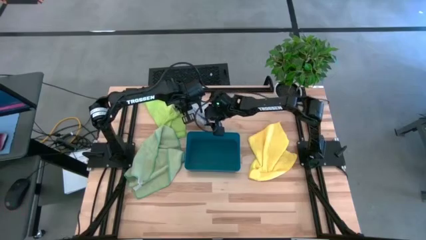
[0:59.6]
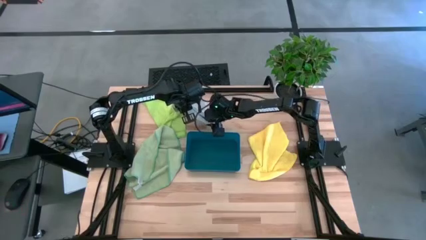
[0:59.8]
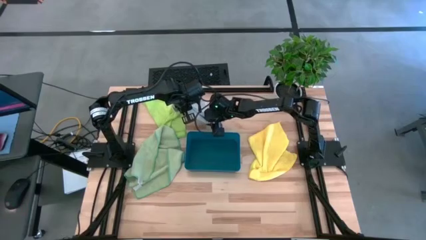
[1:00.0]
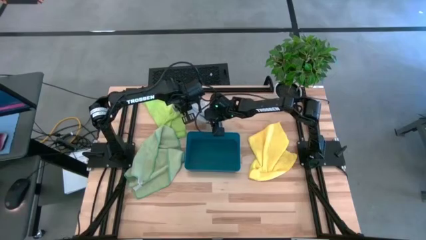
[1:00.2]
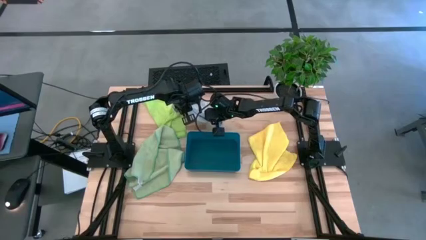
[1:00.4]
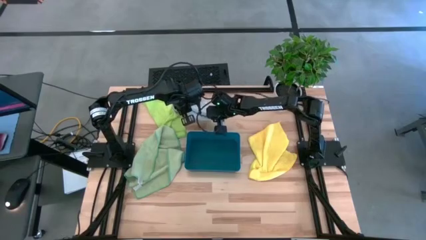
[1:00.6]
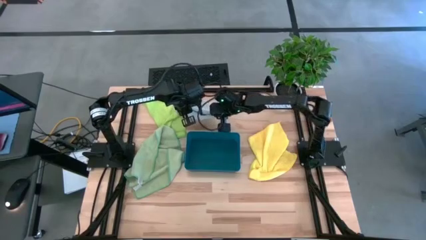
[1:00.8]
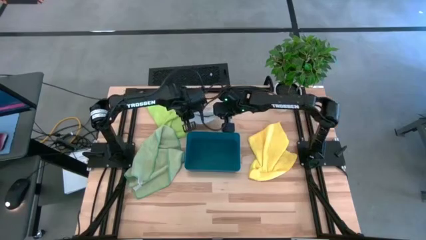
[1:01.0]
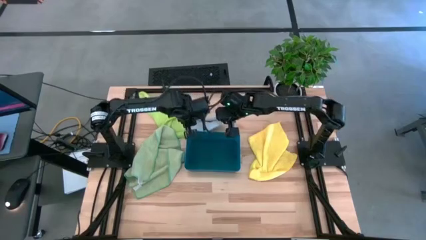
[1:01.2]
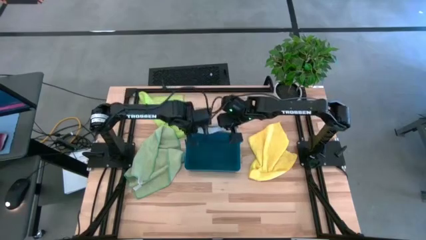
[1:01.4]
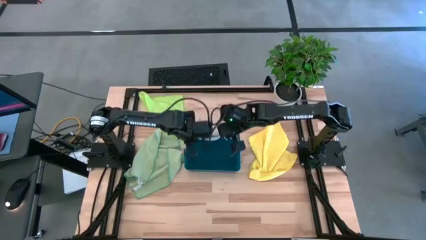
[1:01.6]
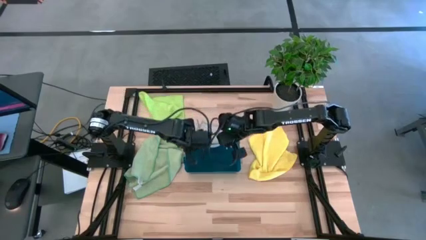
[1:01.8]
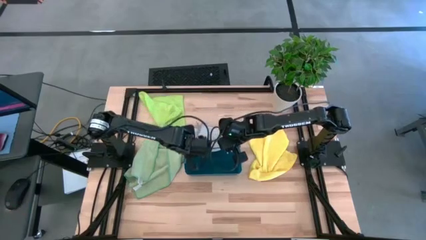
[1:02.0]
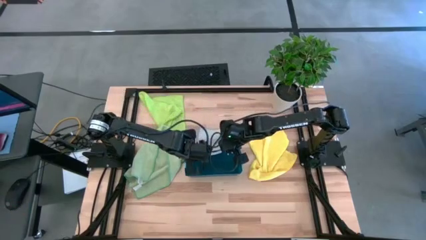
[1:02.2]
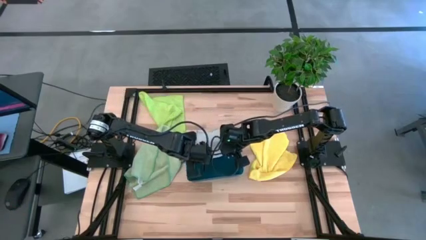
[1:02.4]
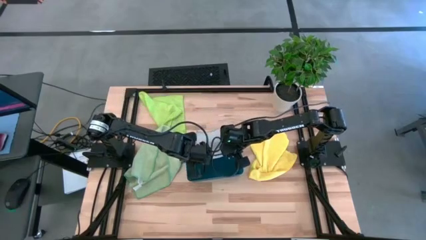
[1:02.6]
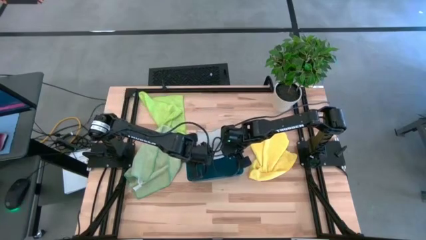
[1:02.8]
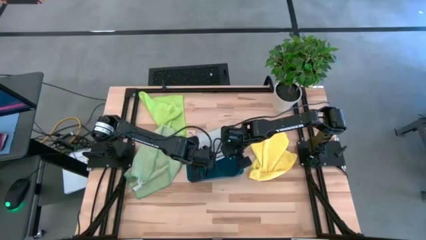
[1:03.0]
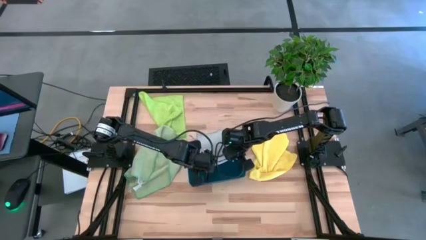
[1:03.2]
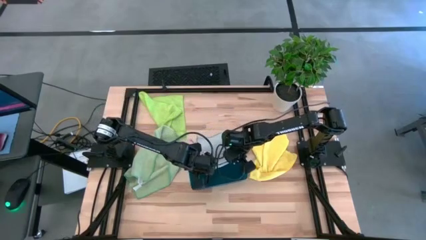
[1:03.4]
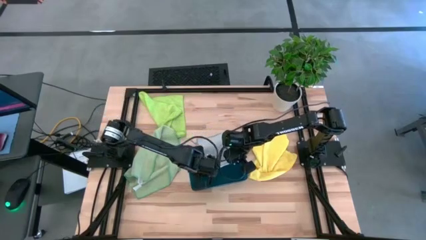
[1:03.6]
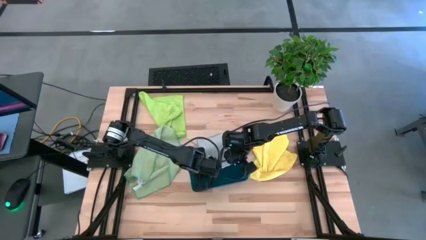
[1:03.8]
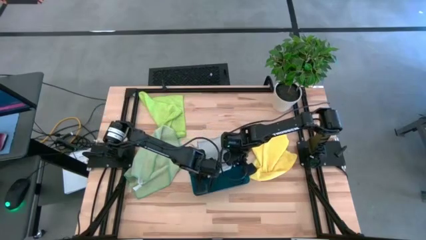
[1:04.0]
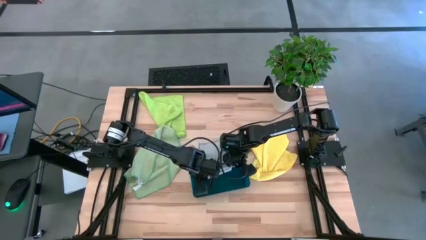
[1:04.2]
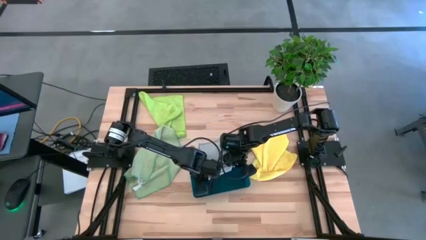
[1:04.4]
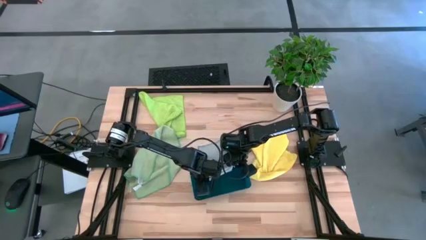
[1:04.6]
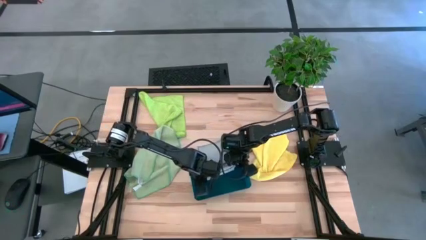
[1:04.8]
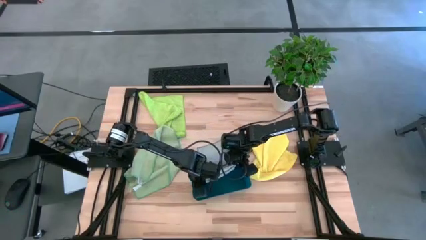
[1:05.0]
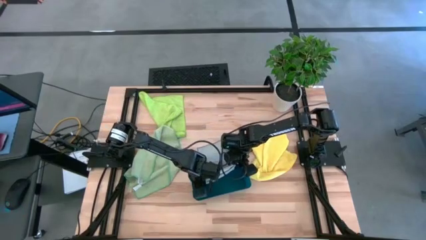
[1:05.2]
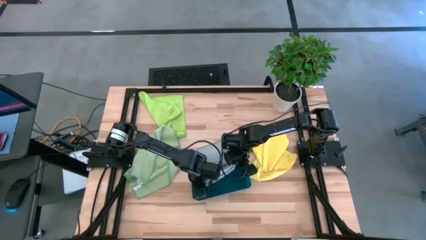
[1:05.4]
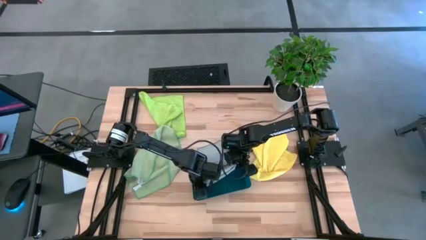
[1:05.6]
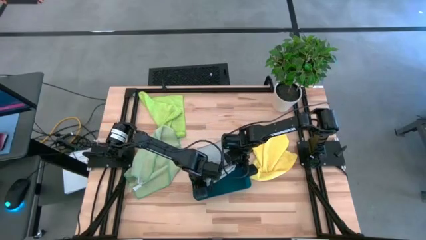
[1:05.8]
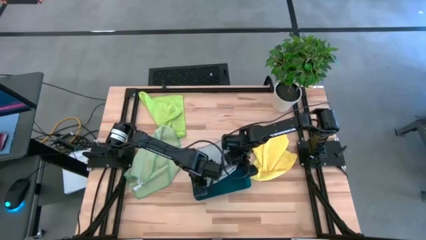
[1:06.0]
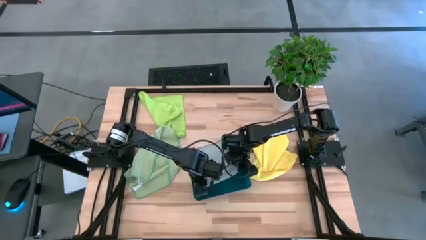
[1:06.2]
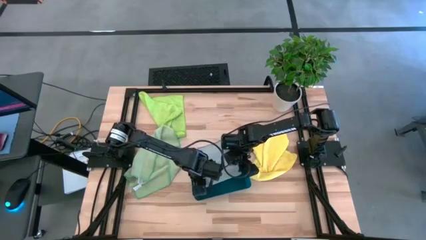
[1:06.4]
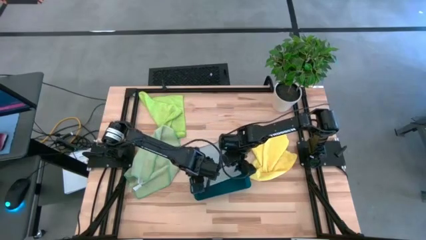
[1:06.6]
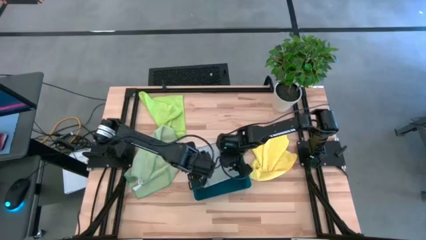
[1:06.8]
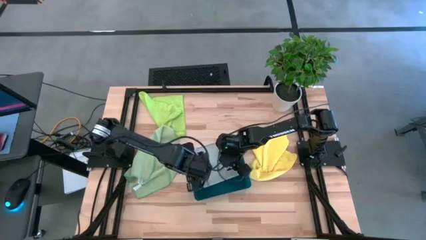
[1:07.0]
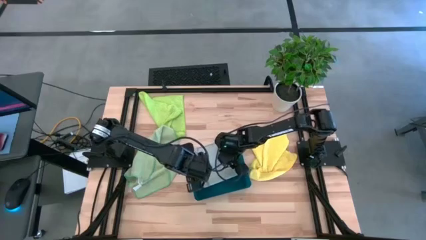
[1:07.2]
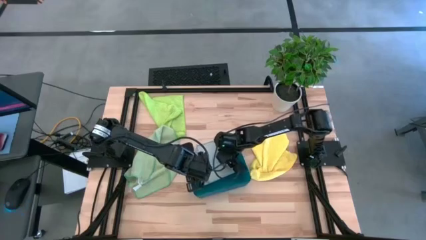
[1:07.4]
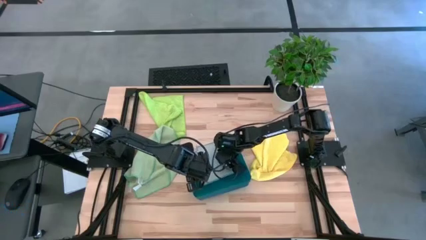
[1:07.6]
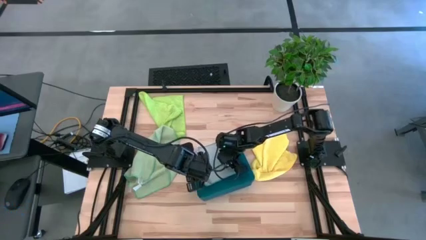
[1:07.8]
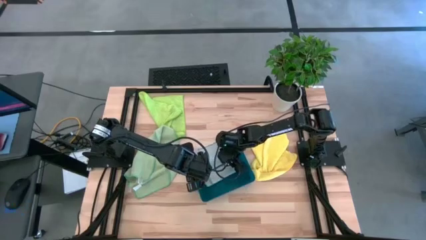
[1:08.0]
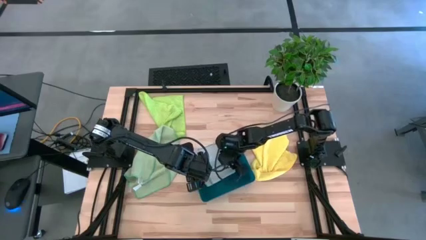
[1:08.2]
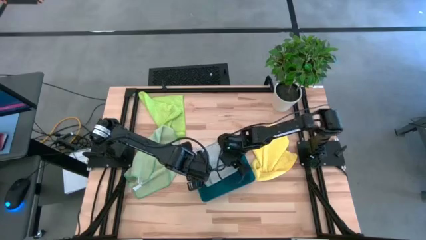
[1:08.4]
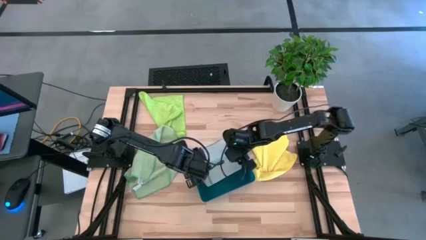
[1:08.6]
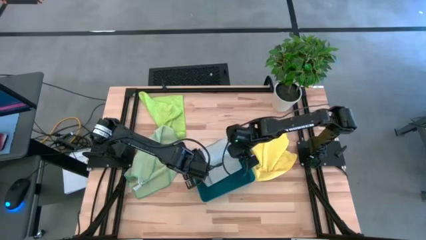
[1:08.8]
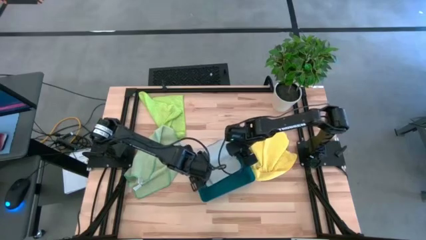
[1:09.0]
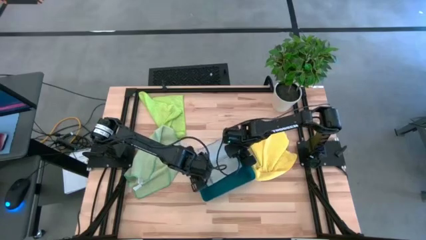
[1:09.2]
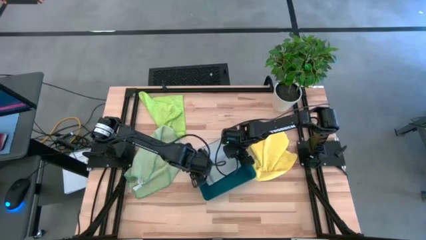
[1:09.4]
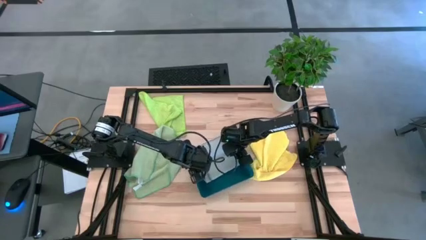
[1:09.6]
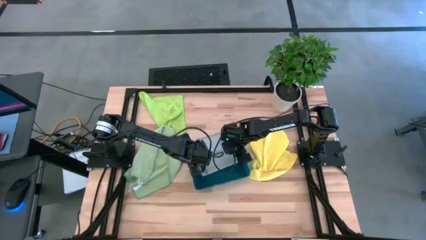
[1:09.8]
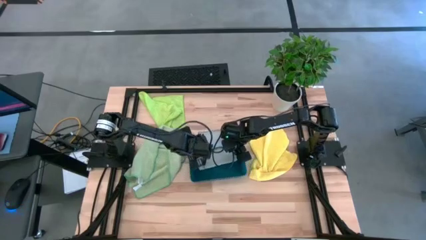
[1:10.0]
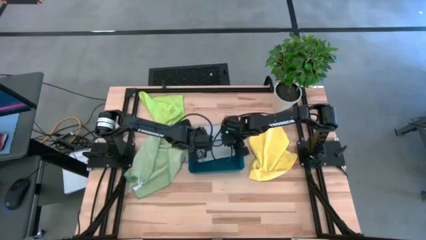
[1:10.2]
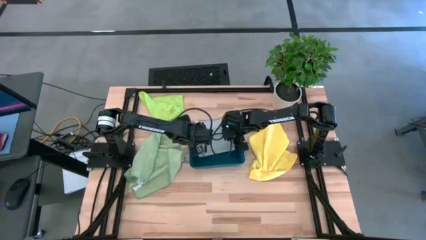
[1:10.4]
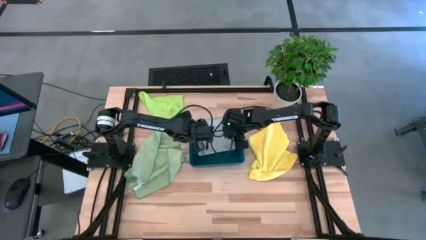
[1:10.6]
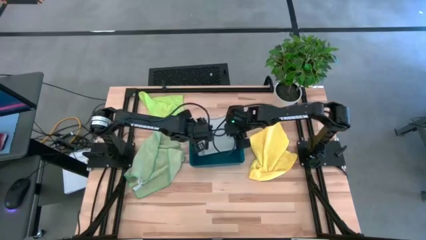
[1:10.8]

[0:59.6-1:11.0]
Task: Fold microfiber towels
Put the folded gray microfiber towel into the blue bin

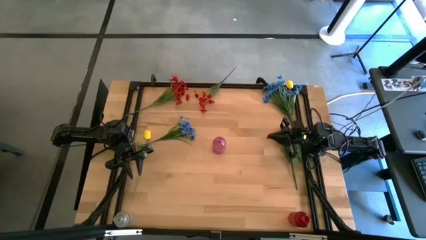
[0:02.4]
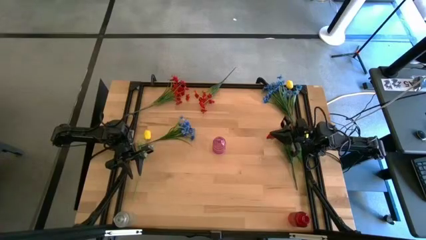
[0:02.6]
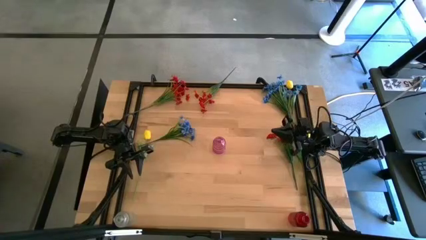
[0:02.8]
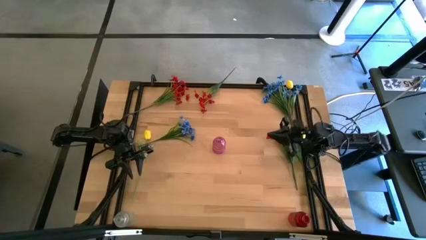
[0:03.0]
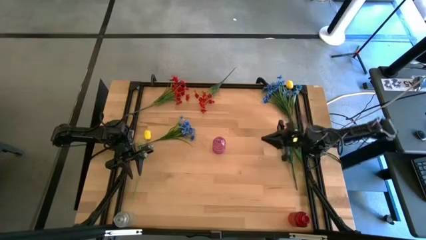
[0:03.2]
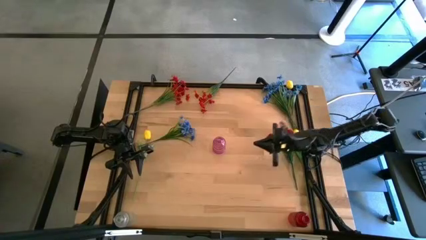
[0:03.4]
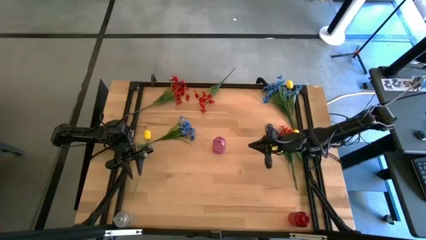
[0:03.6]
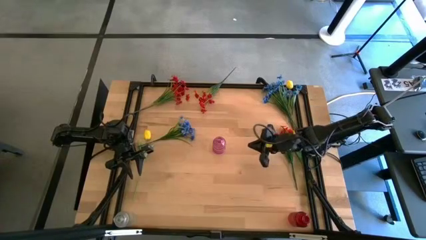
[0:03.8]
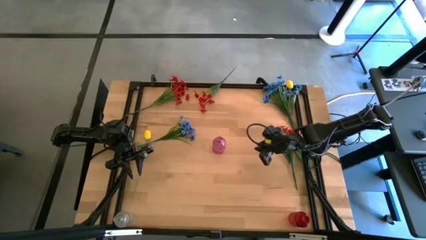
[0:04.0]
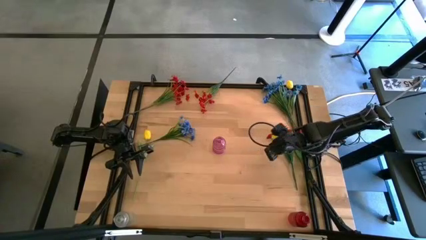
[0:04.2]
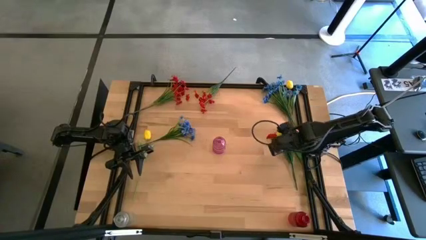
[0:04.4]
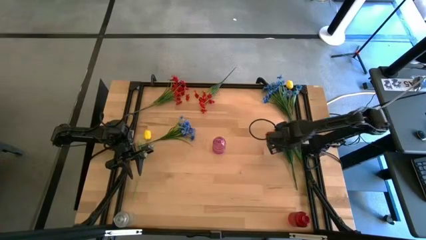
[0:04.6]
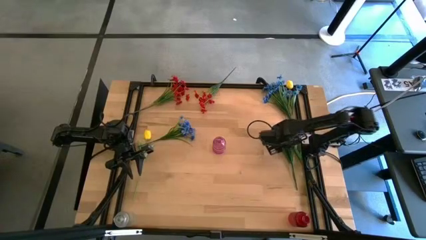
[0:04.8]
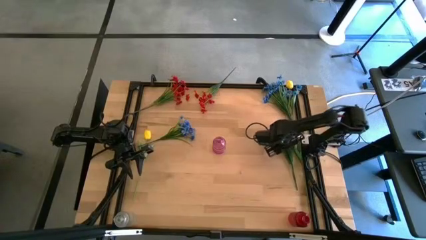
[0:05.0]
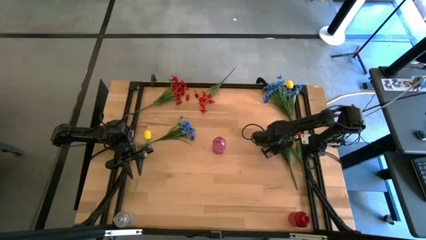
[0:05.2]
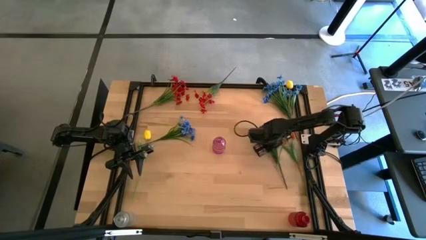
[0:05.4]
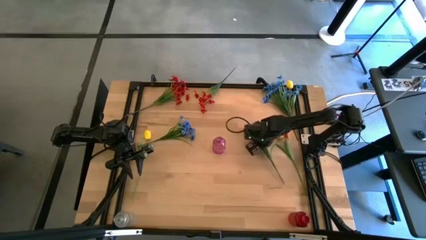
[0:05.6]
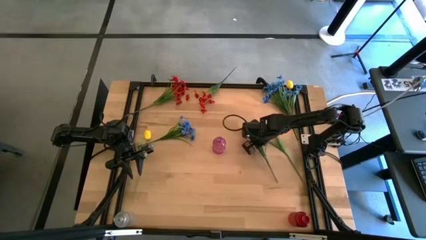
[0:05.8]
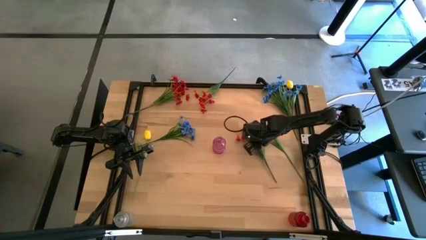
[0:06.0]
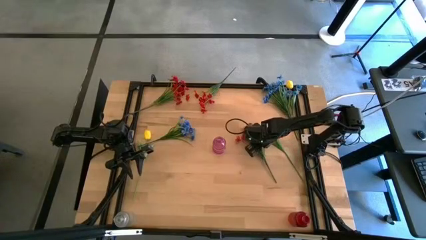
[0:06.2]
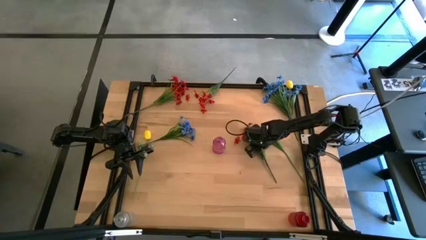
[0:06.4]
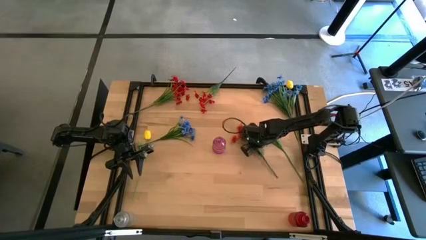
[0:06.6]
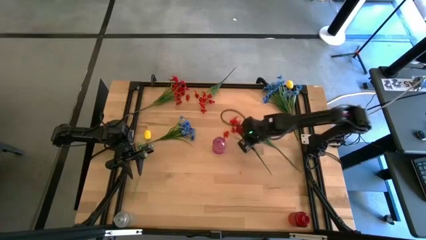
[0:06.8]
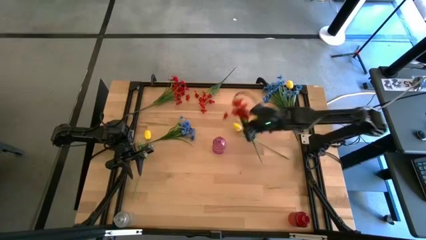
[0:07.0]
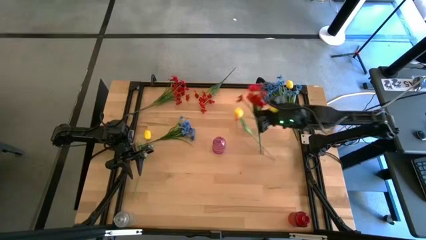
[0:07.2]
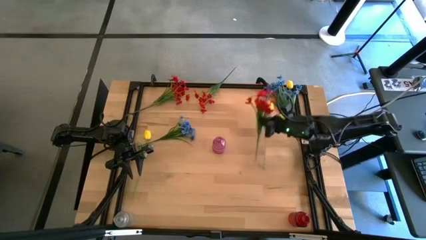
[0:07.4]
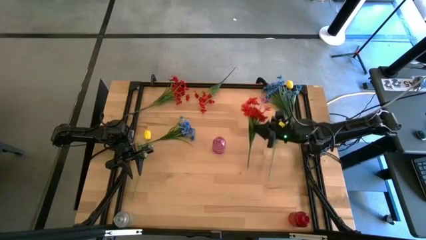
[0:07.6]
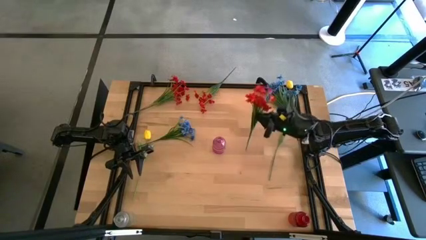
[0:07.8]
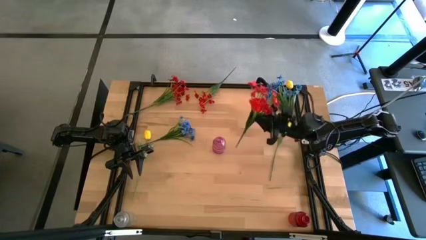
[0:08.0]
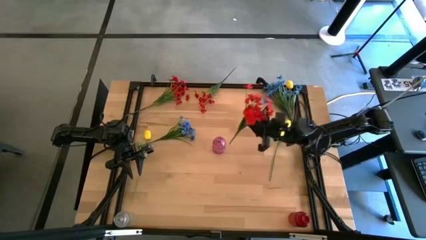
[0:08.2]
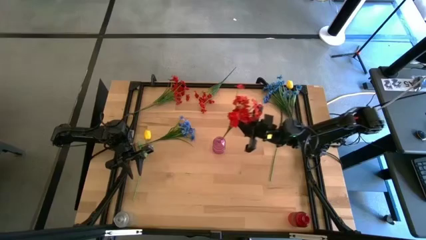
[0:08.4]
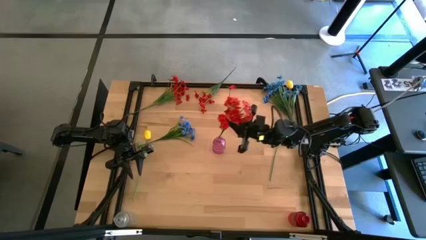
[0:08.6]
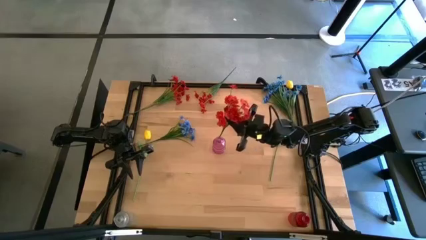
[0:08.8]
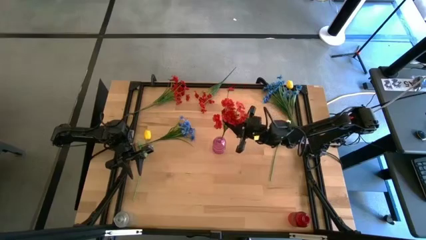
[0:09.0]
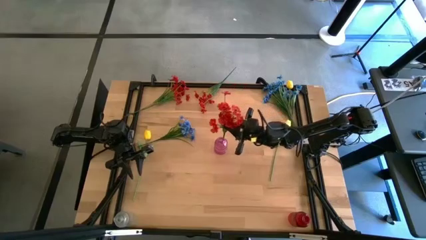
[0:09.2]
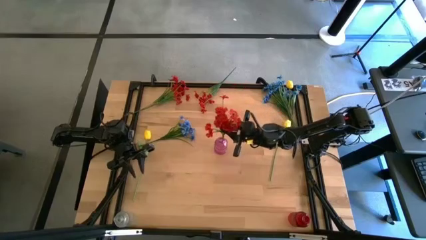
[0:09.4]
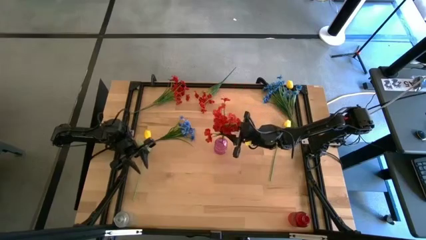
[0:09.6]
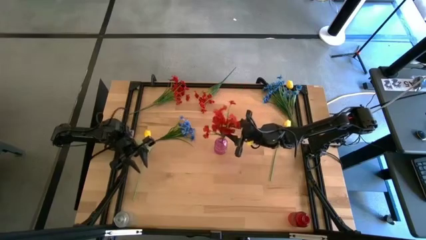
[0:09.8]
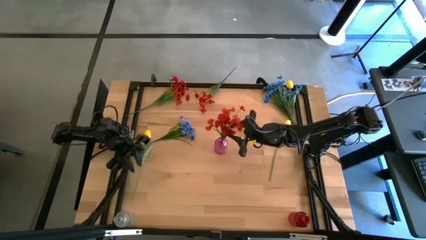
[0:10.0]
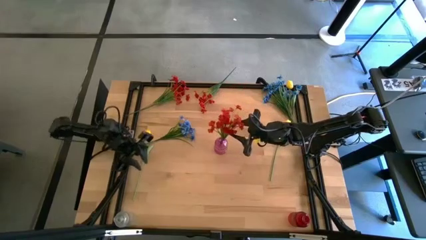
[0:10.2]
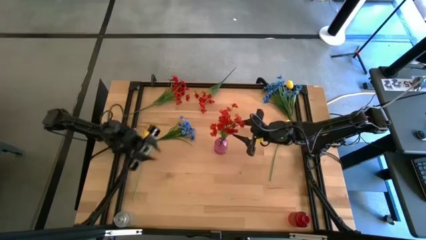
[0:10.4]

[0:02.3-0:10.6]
Task: Sort flowers into vase by color
Put the right red flowers into the violet vase
